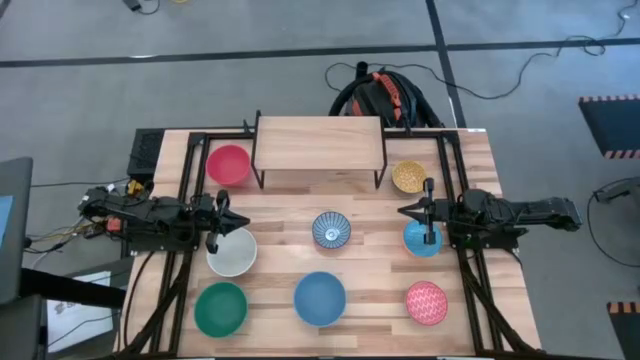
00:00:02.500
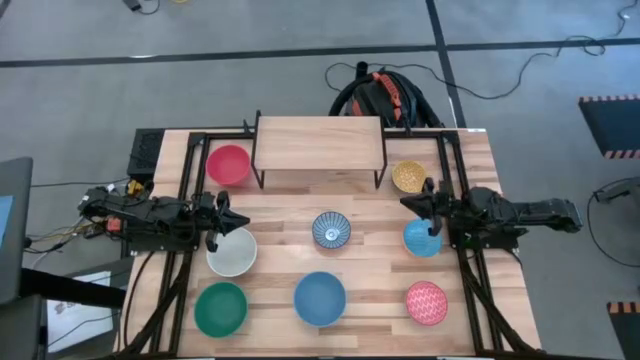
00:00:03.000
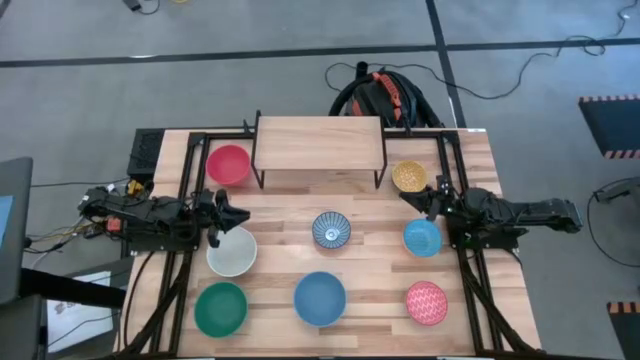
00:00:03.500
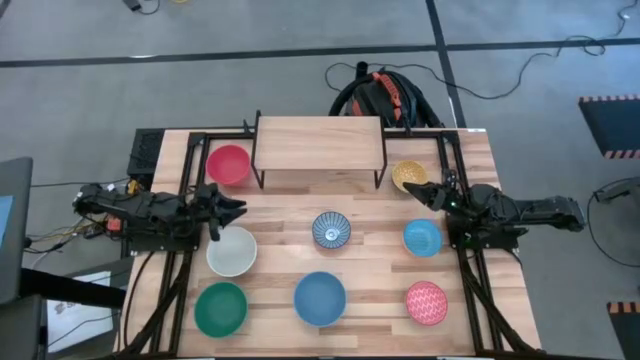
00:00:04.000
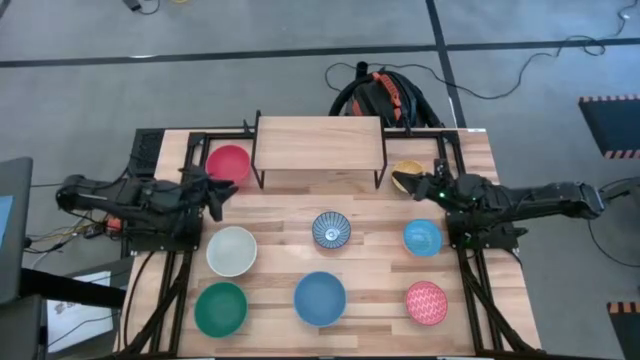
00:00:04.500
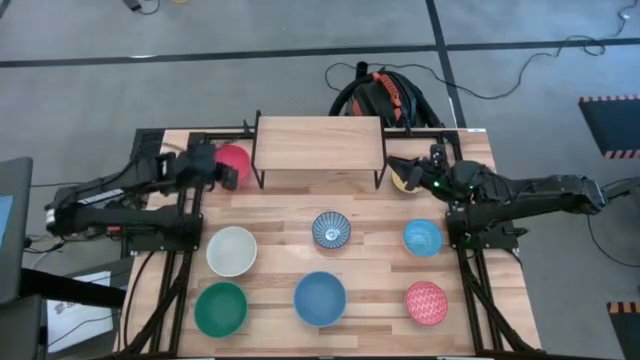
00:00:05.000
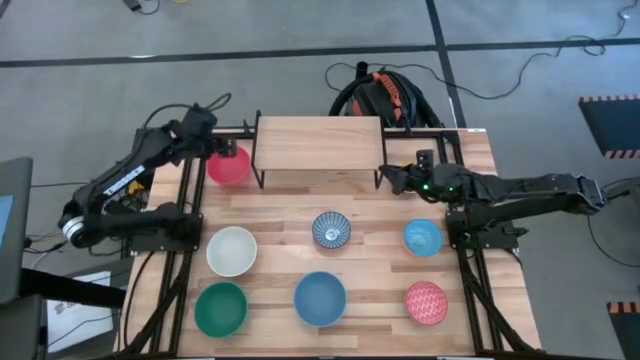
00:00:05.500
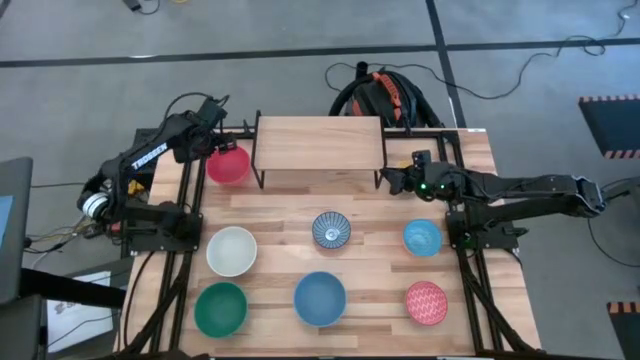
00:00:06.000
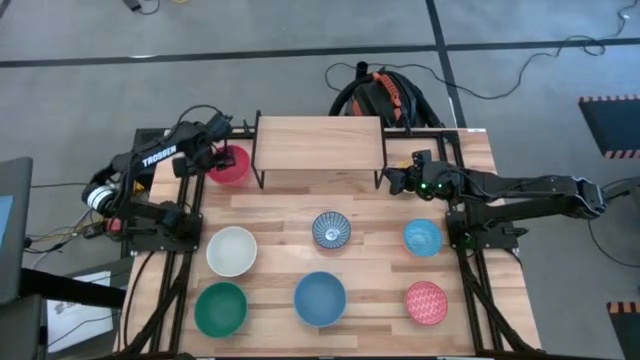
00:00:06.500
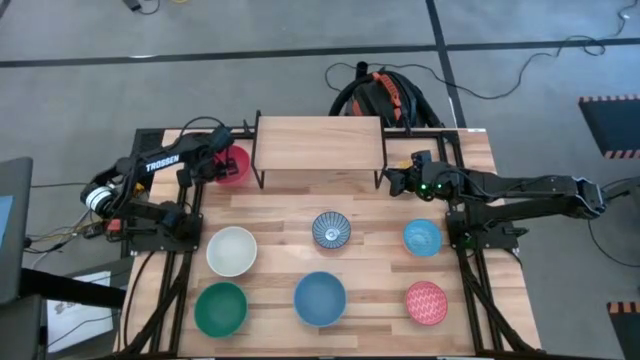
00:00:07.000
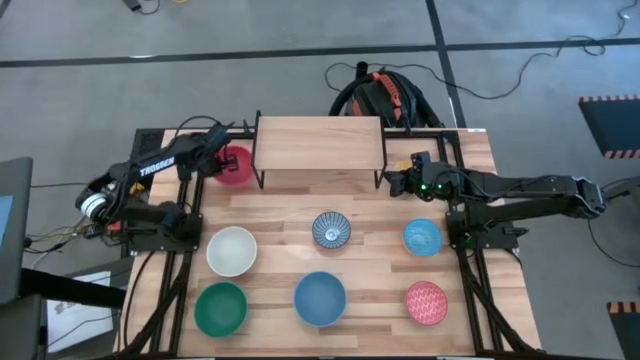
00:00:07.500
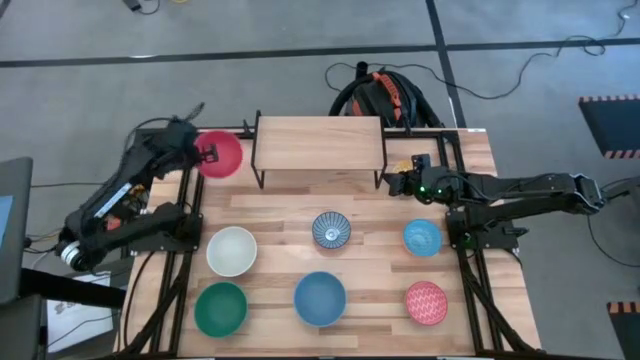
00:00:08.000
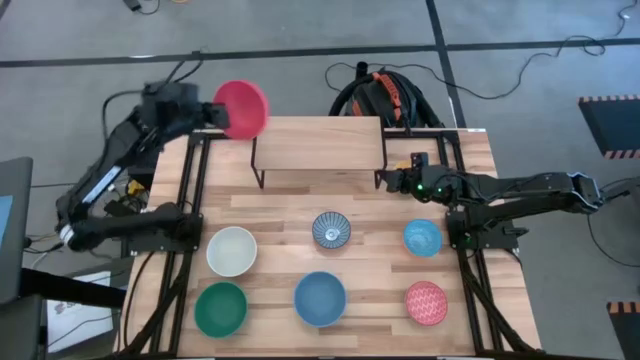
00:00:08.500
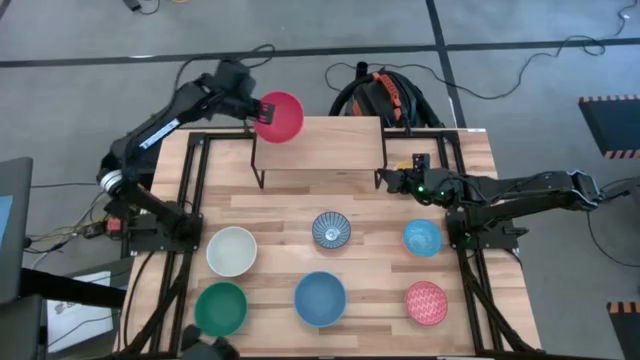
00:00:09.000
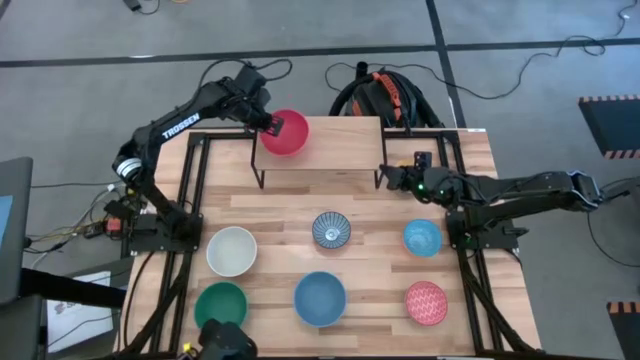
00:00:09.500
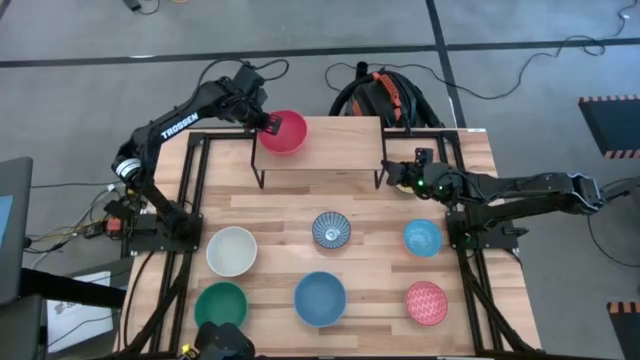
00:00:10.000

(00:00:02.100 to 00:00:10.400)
Task: Place and stack bowls onto a shelf
Put the pink bowl on the shelf

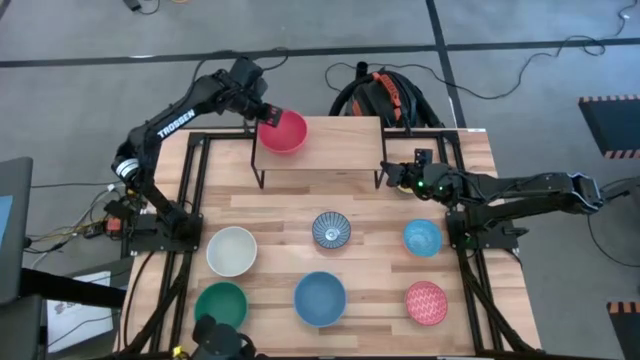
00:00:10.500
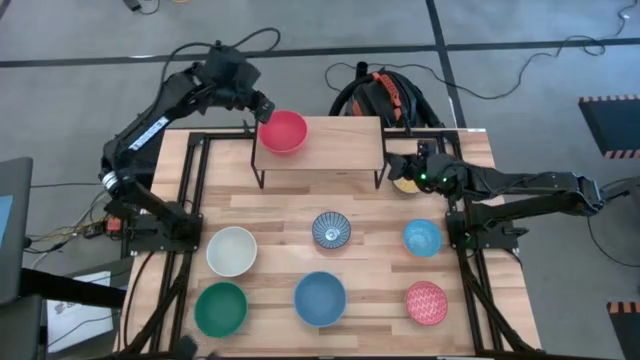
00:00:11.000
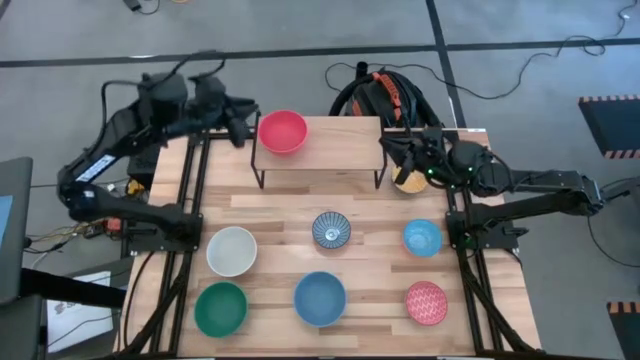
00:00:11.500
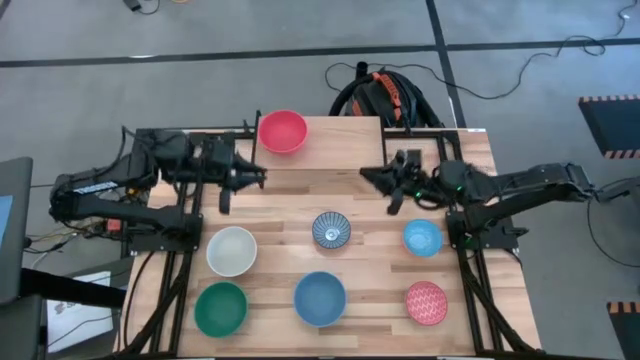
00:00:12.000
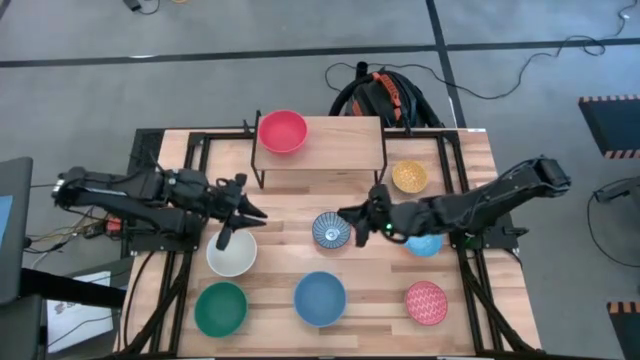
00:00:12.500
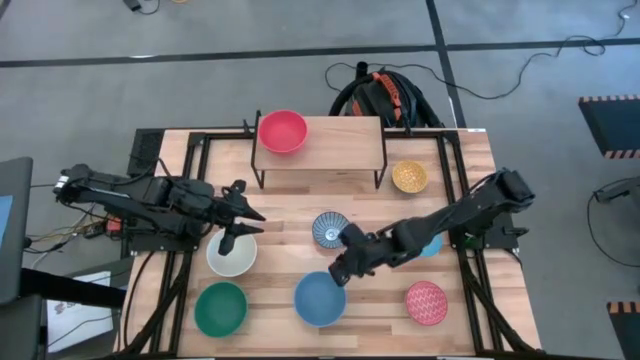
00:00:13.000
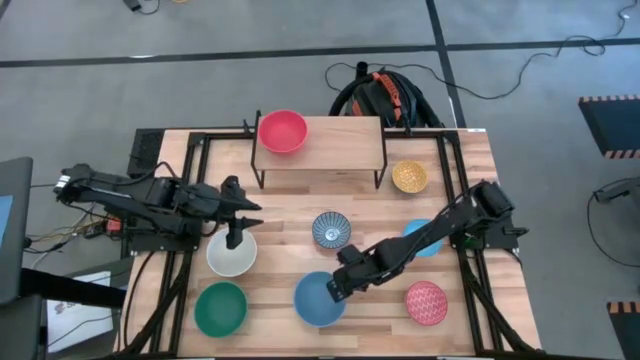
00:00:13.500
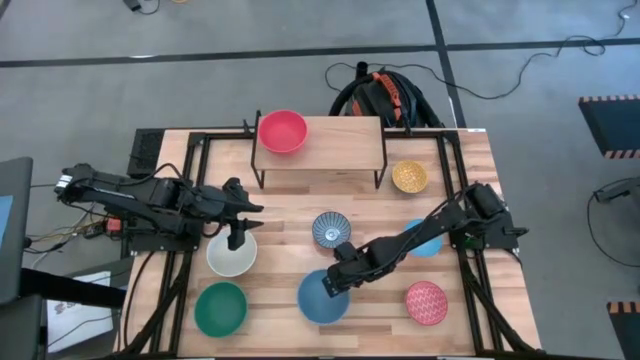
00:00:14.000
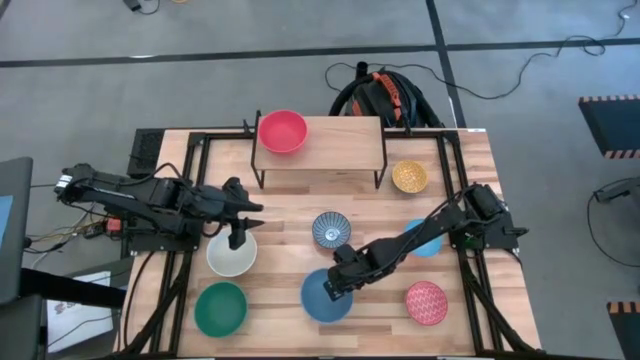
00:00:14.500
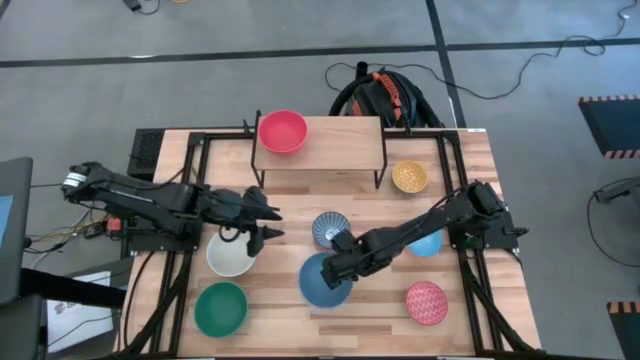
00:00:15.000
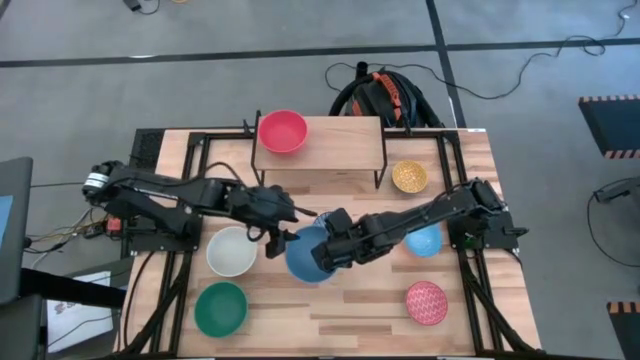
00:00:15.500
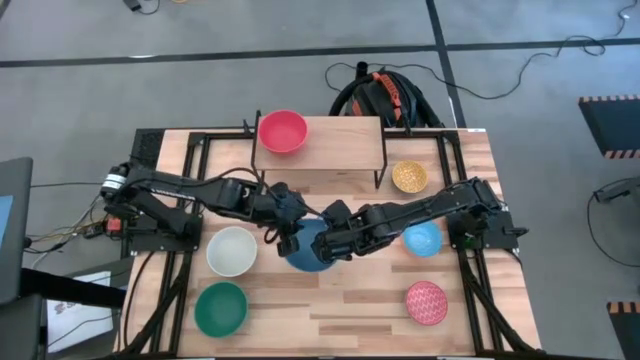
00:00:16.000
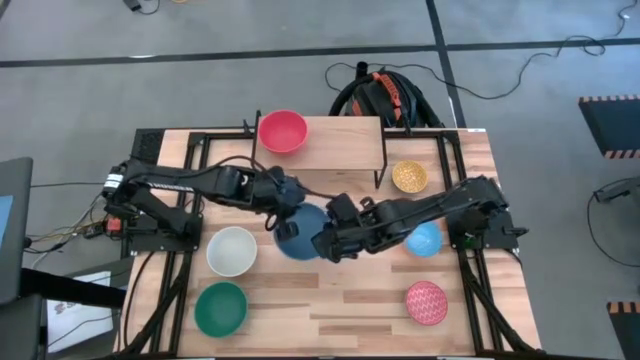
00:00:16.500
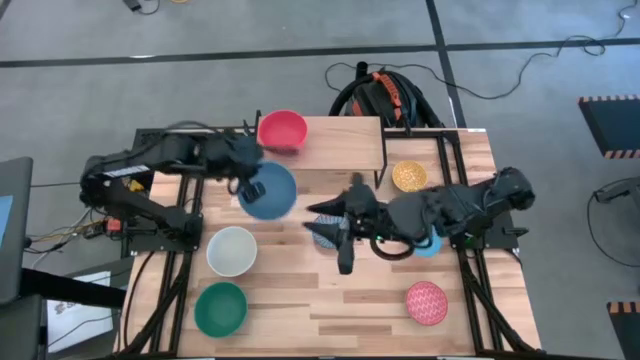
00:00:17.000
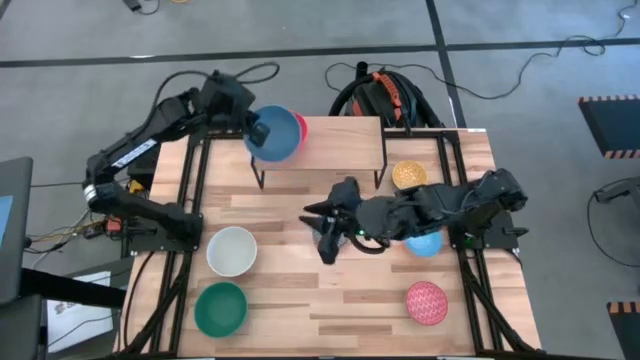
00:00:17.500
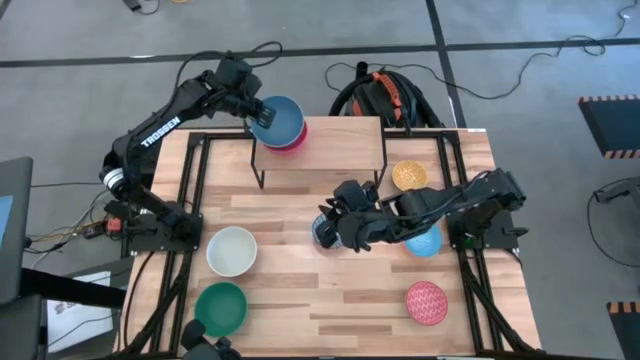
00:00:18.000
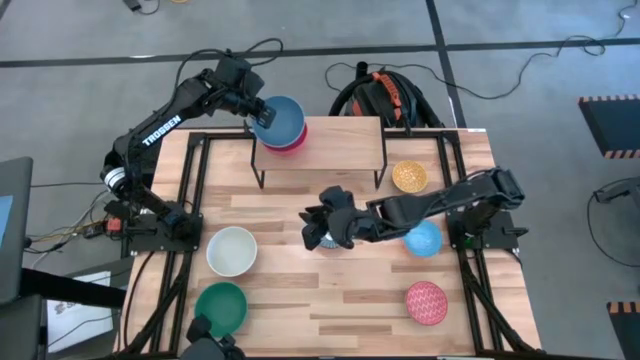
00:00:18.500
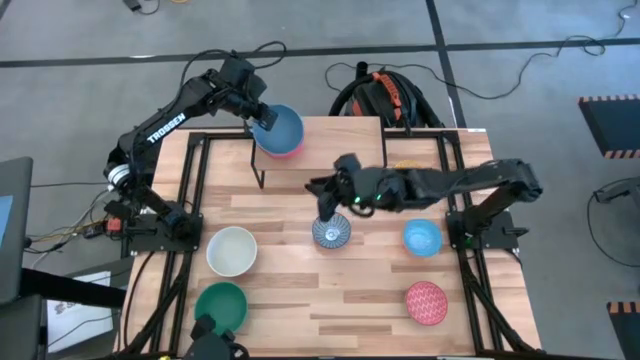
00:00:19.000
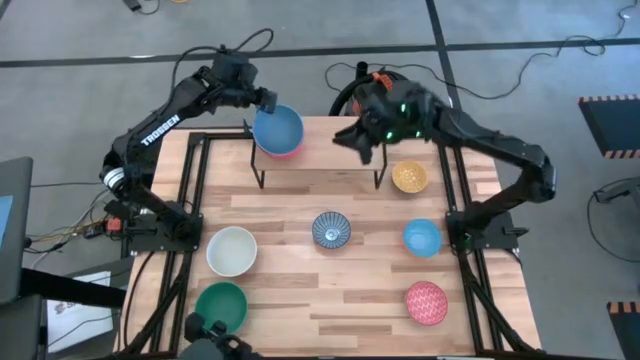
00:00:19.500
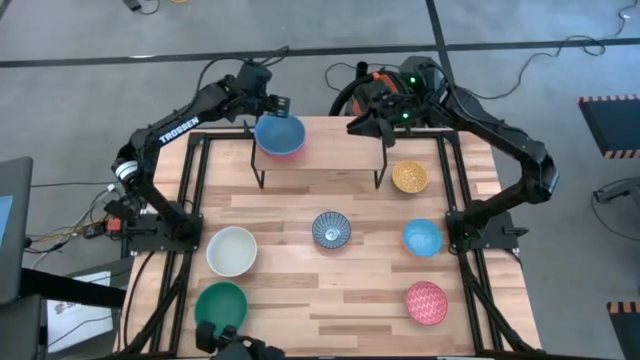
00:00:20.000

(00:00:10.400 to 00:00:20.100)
Stack the blue bowl on top of the orange bowl on the shelf

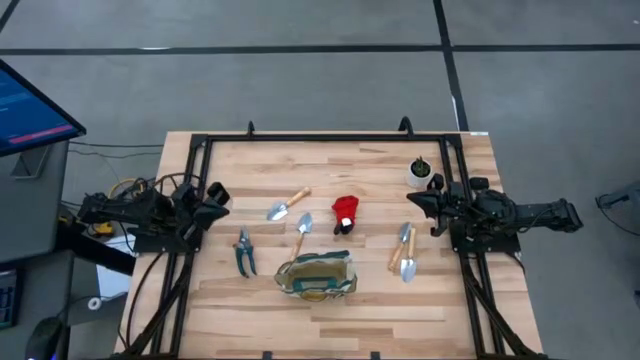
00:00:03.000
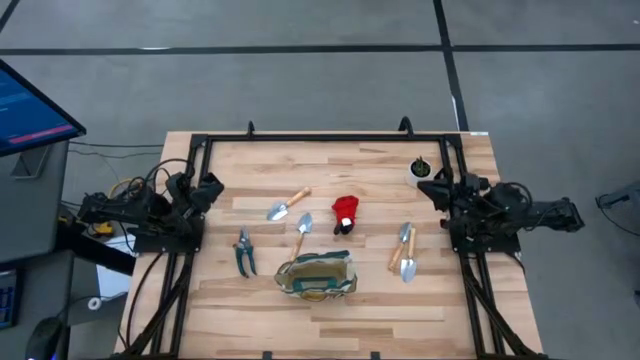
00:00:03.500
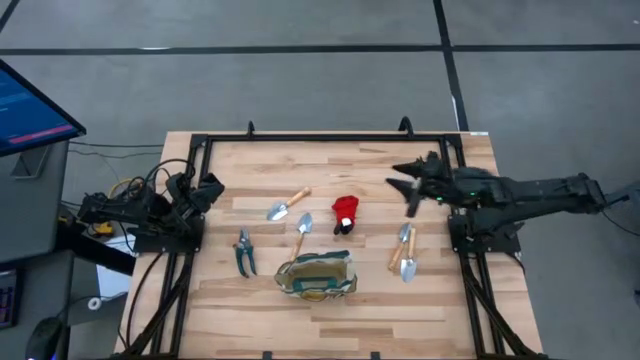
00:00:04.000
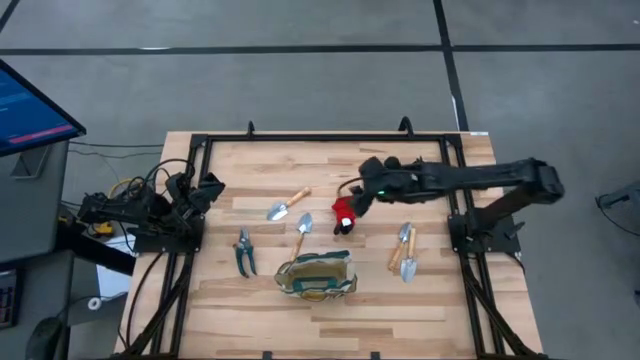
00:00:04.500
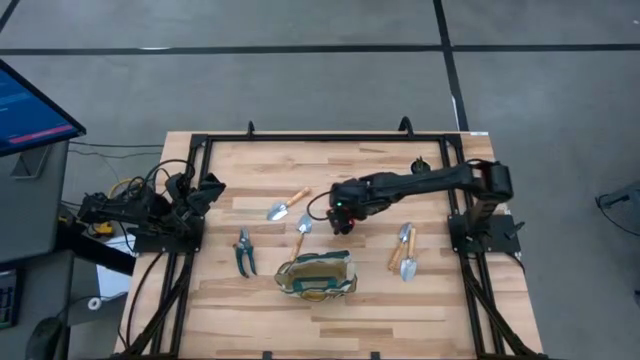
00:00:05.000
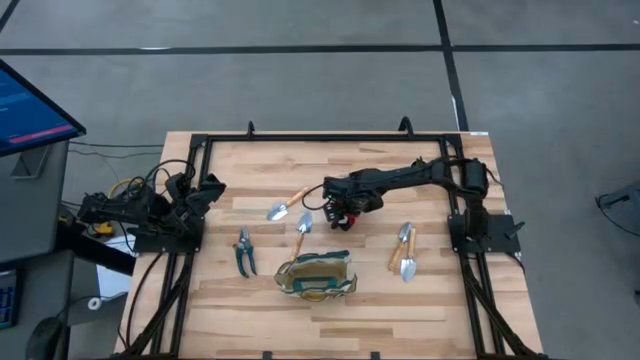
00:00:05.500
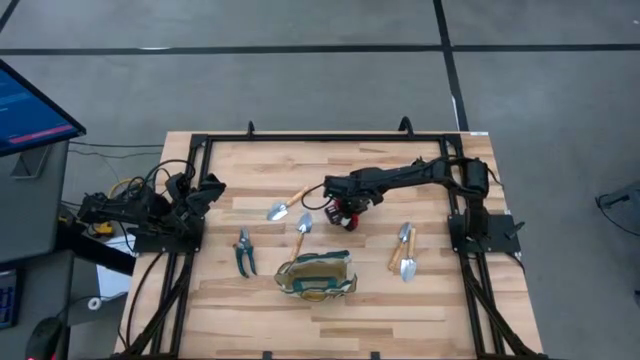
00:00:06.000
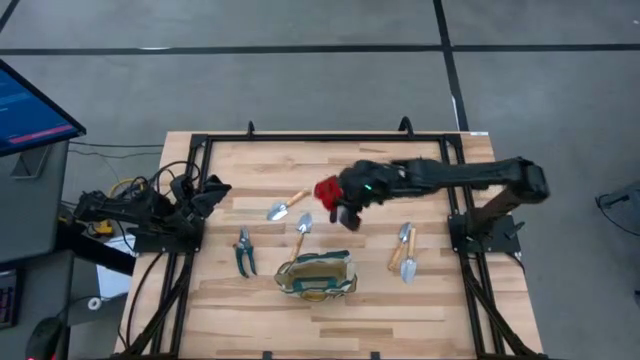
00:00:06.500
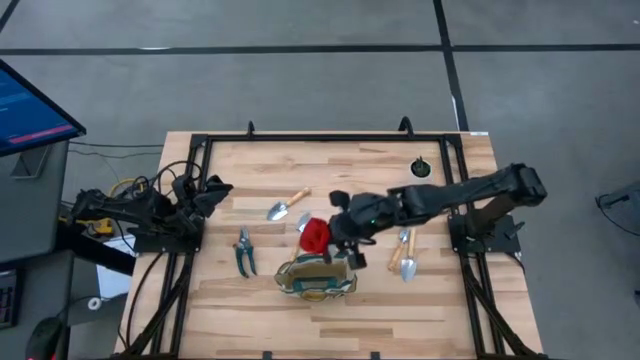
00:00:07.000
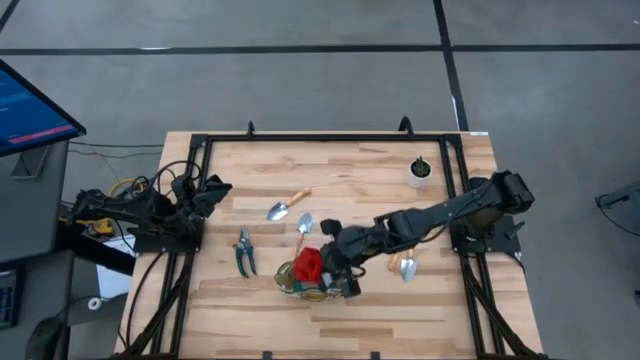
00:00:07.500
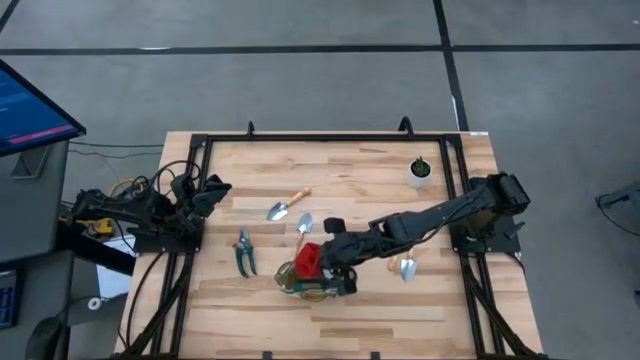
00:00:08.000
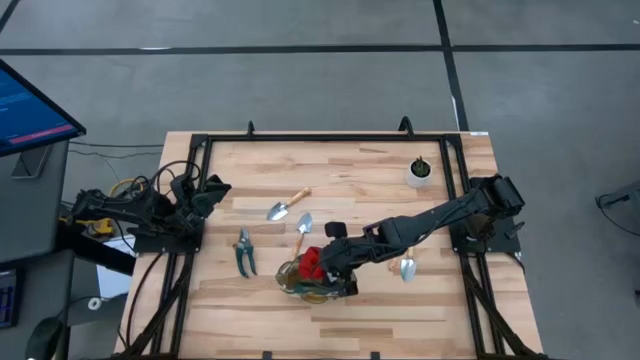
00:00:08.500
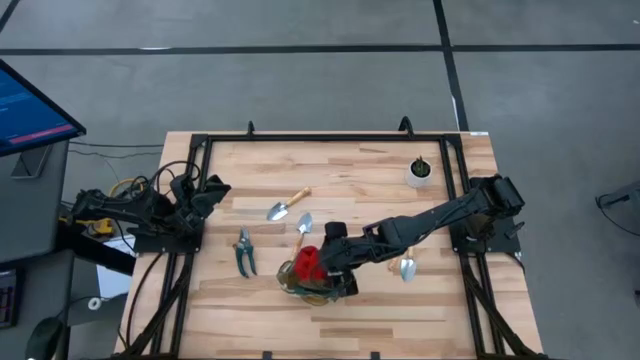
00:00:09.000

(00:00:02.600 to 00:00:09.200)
Task: Pick & Place Garden tools in Gardening bag
Put the red gloves into the gardening bag
